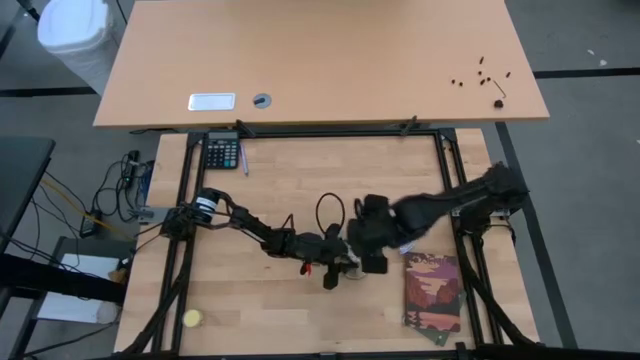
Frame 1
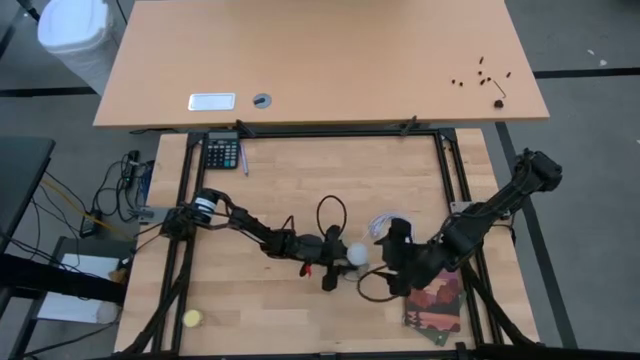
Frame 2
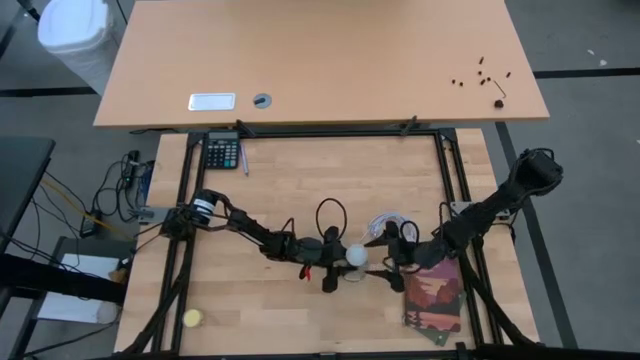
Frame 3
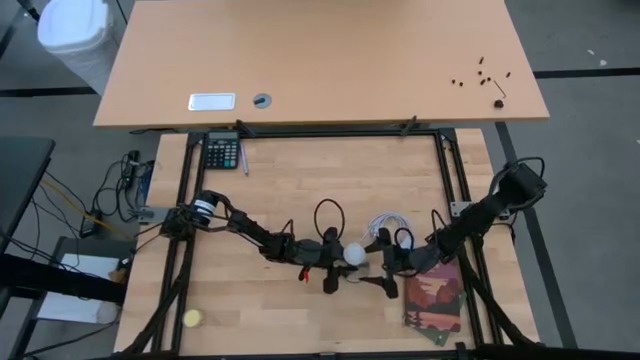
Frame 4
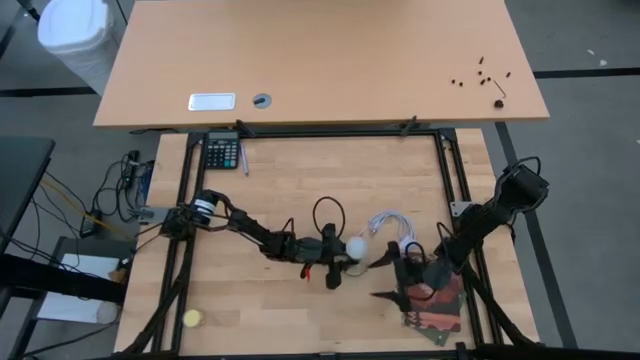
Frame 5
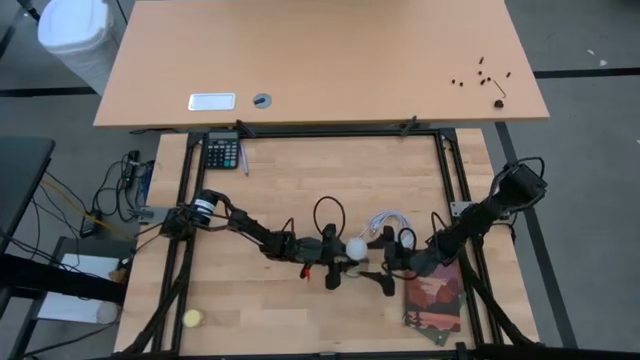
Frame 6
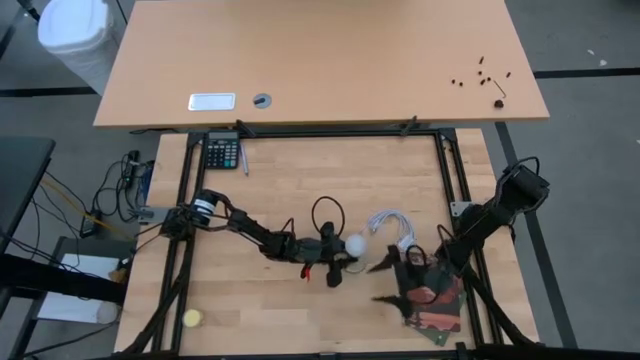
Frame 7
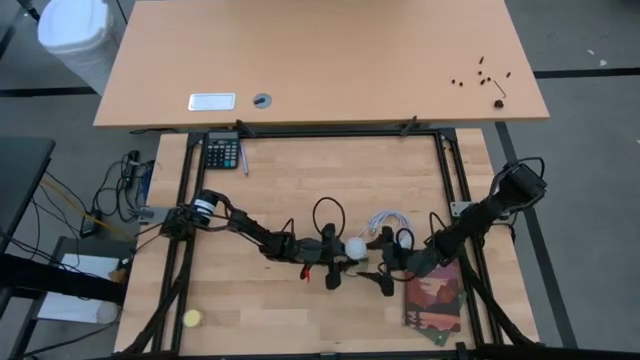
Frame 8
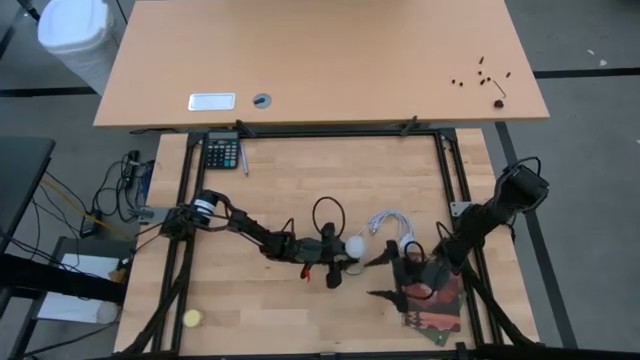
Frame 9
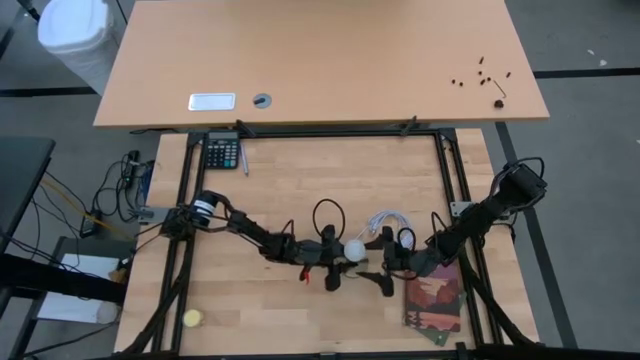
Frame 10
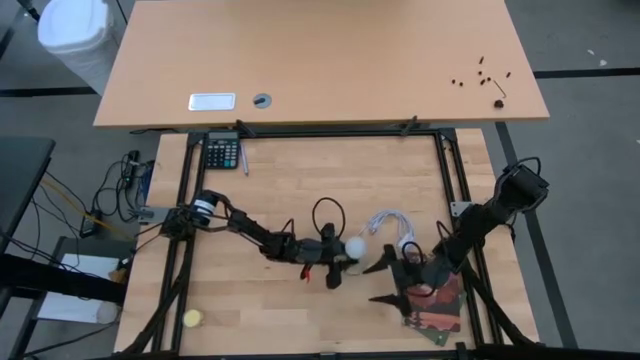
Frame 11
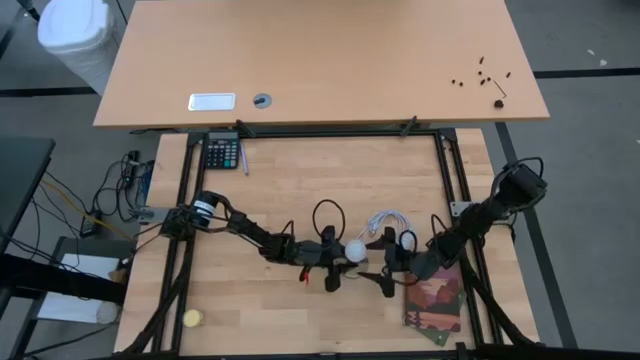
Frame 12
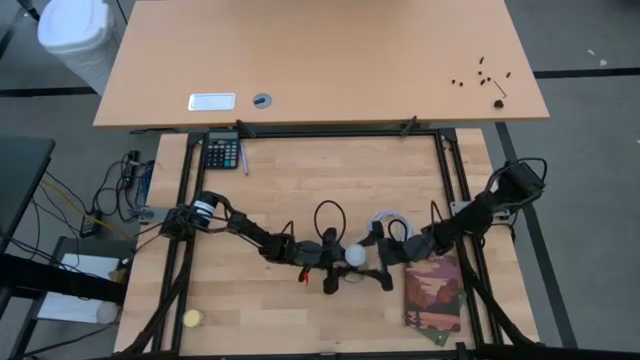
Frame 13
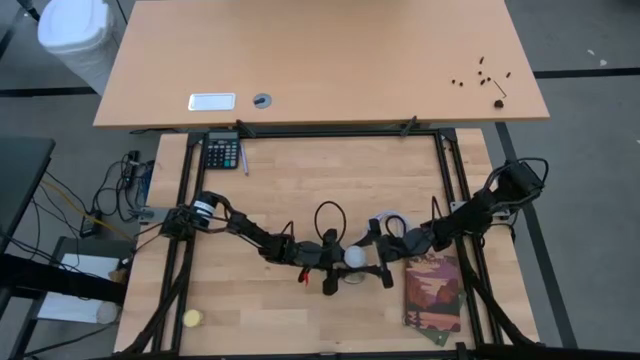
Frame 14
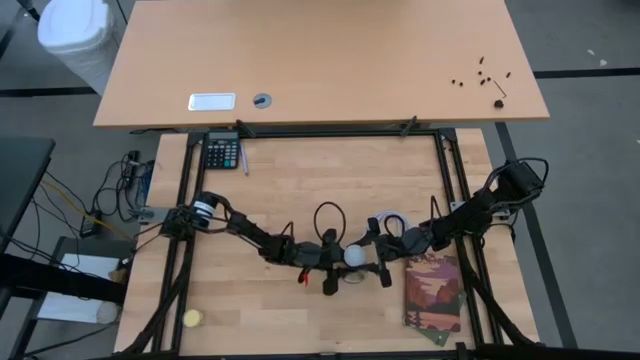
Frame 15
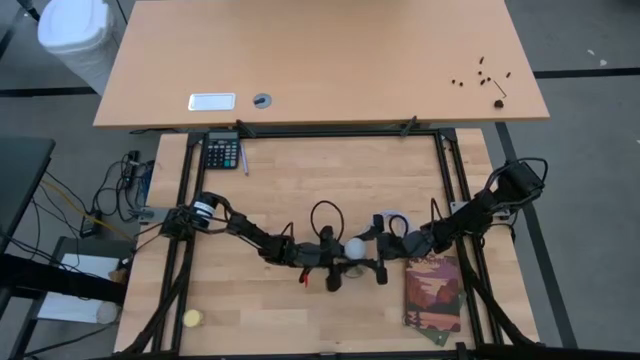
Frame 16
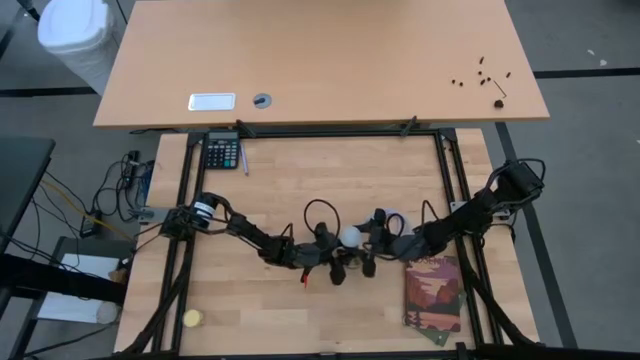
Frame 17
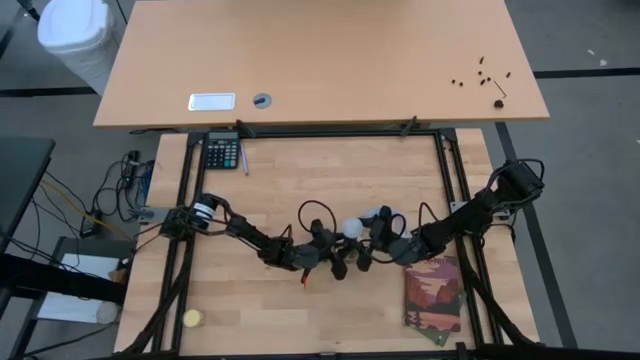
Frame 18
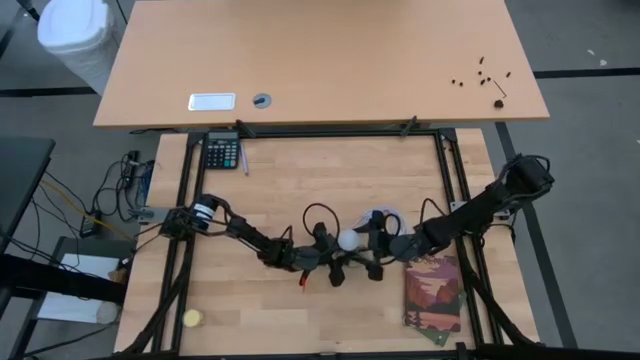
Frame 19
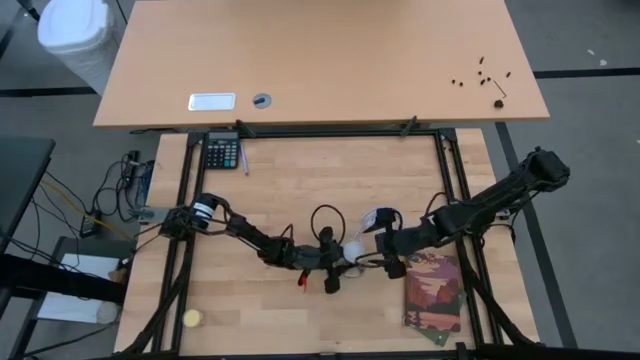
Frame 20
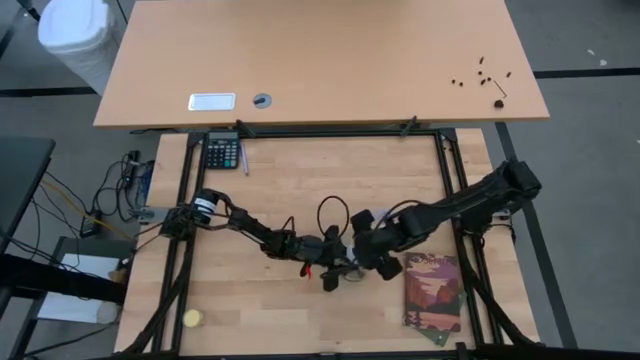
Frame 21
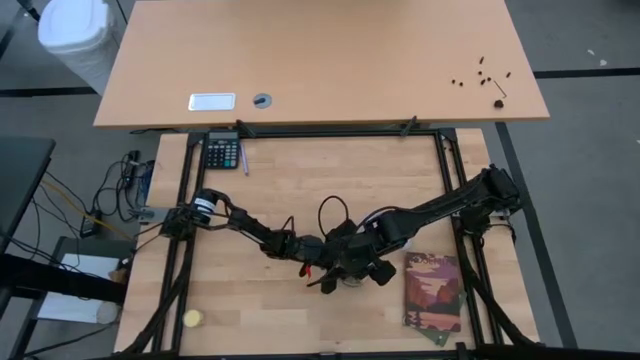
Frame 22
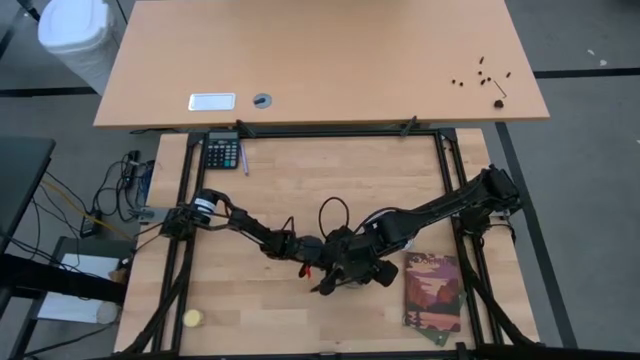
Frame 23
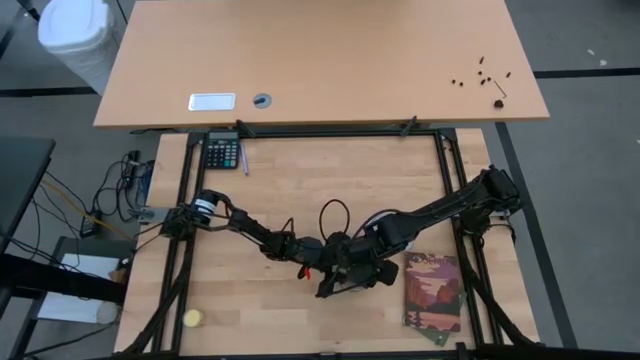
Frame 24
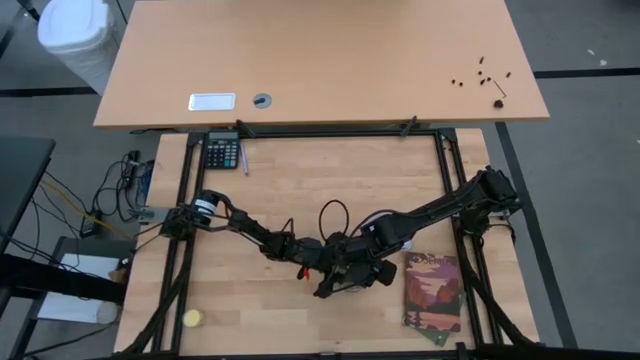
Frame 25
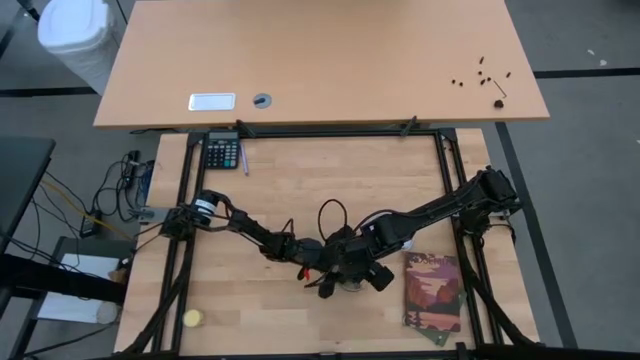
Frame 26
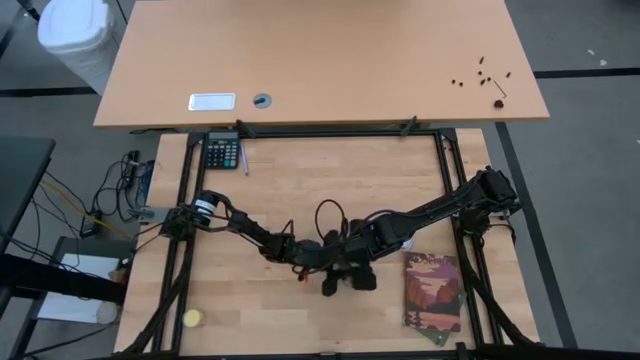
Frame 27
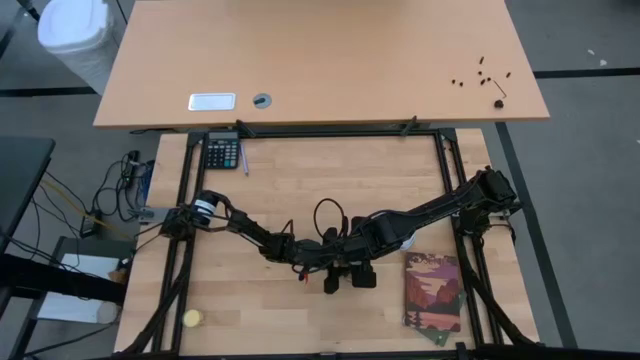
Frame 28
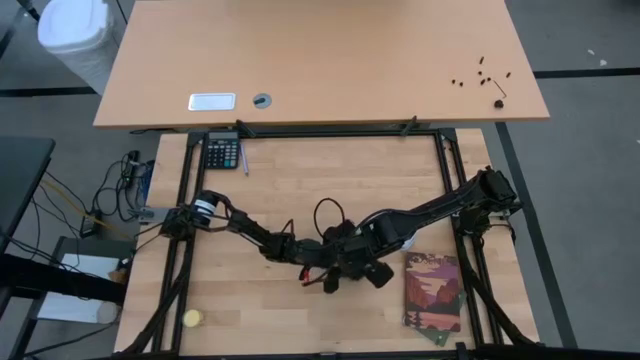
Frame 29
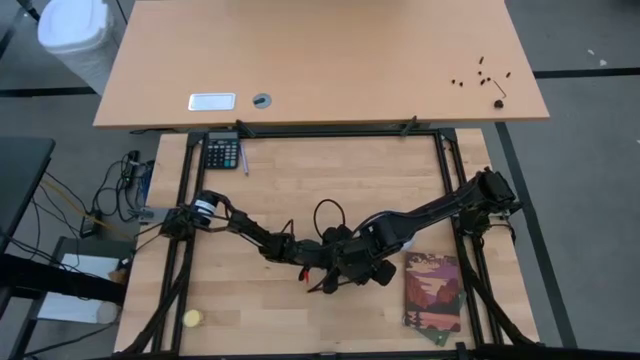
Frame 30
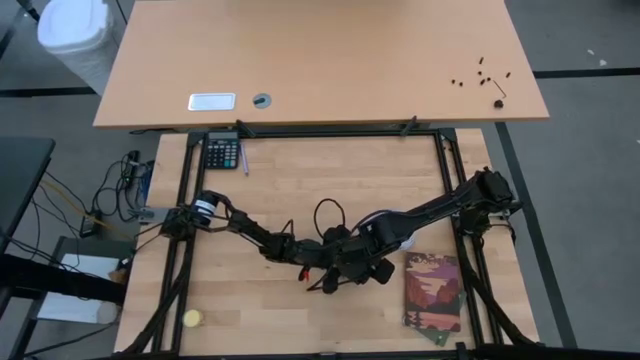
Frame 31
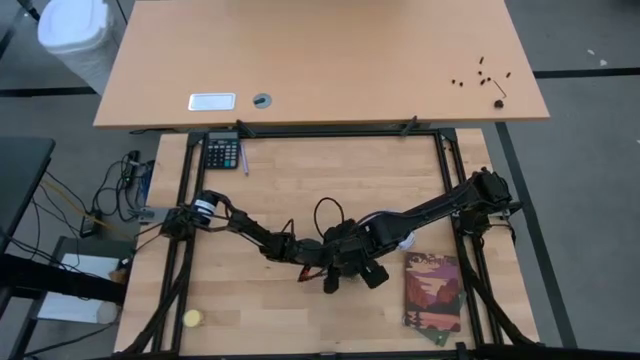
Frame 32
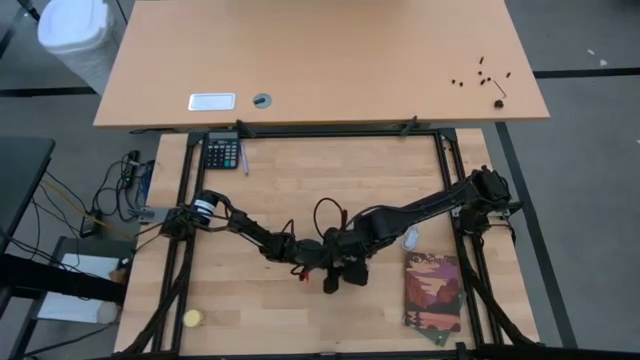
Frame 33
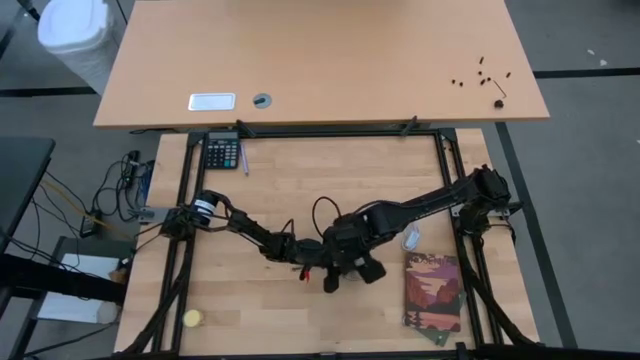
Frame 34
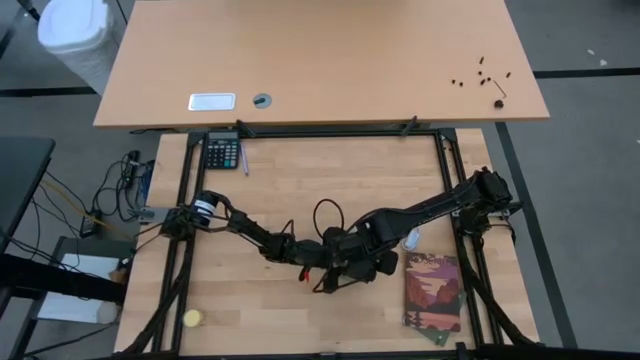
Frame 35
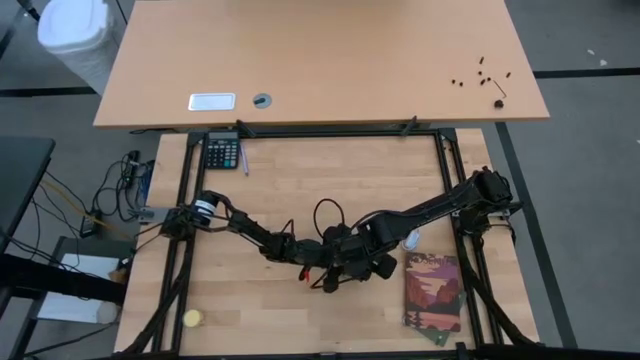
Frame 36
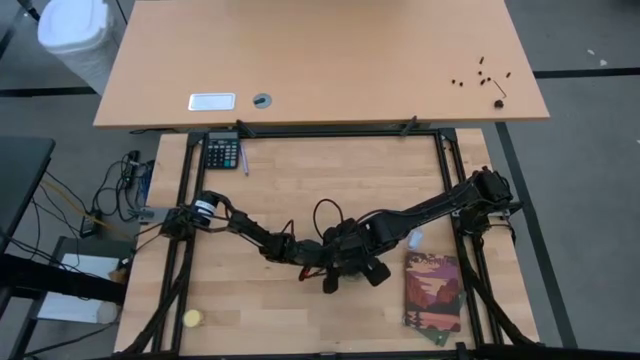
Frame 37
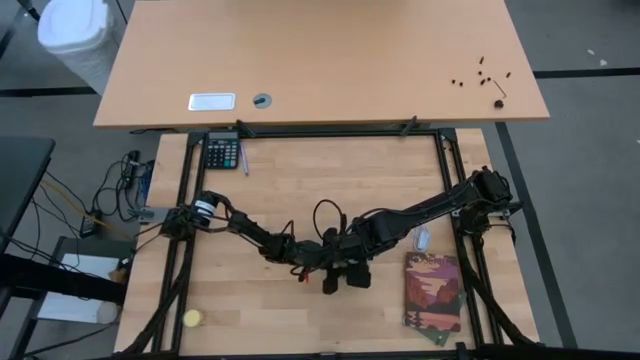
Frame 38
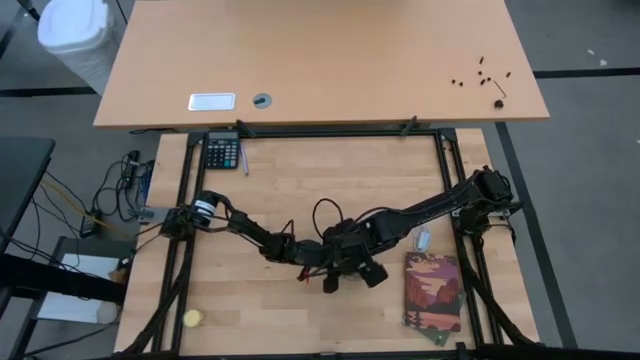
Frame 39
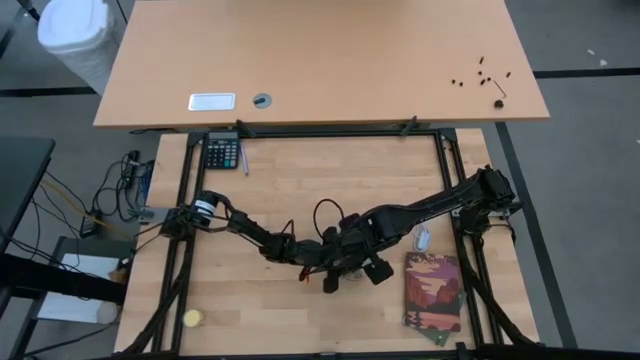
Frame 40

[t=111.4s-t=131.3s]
Task: Screw lightbulb
Insert the lightbulb into the lamp socket
